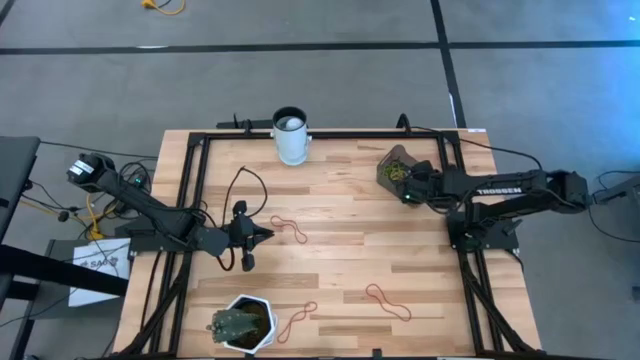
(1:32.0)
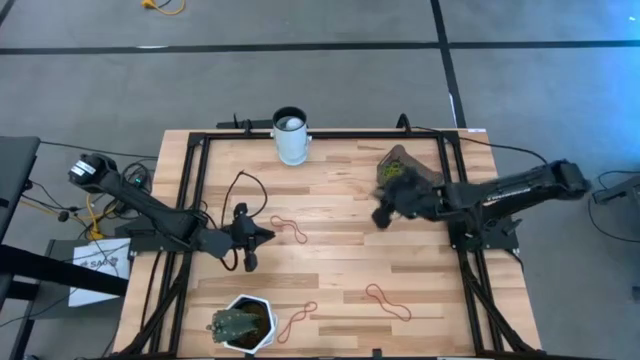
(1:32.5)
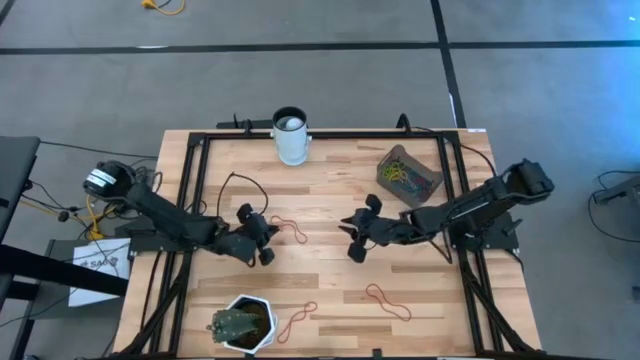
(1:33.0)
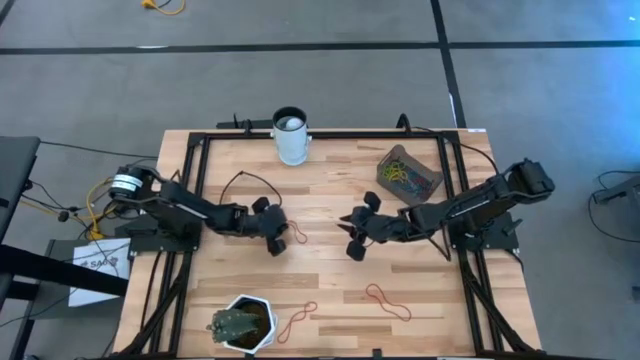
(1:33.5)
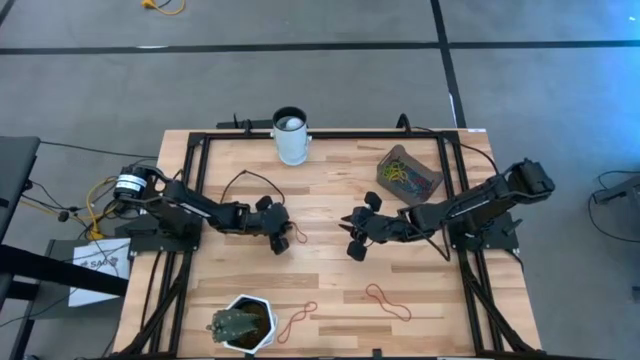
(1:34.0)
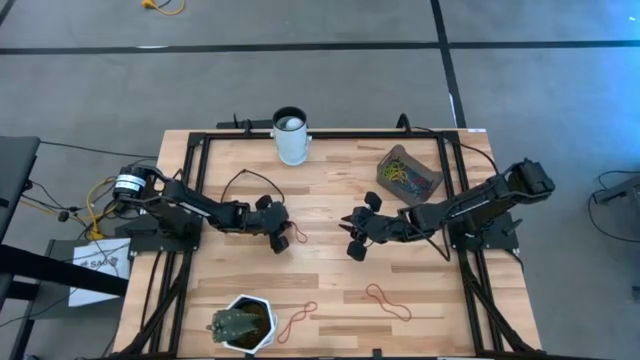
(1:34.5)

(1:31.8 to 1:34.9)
Task: Pick and place items into bin
Put the top red rubber band into the bin

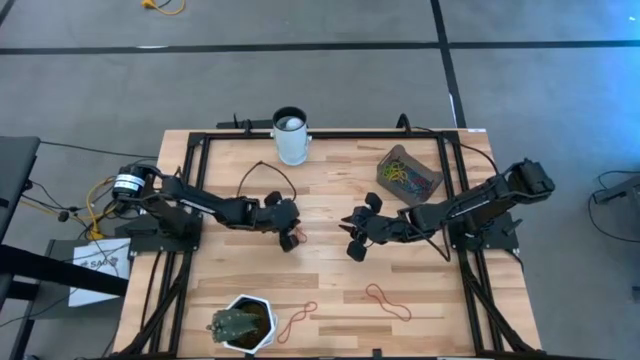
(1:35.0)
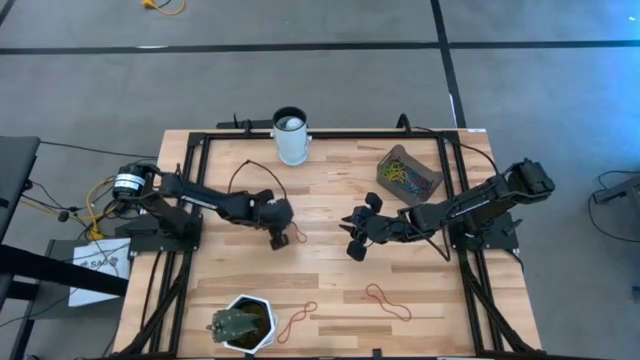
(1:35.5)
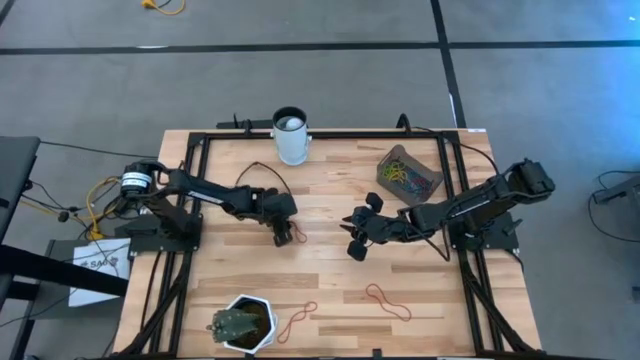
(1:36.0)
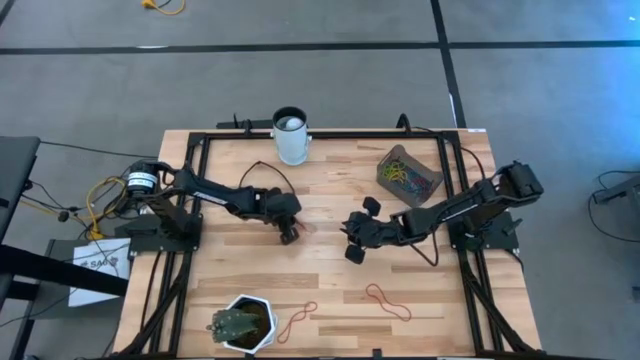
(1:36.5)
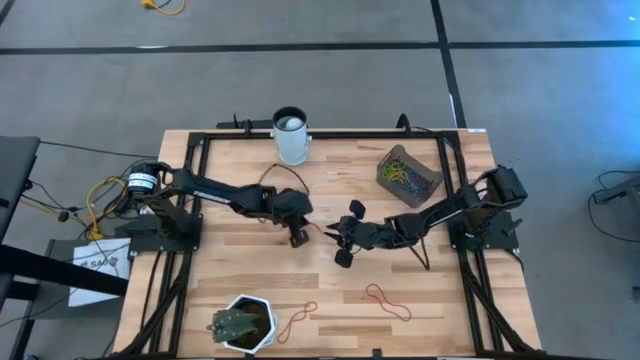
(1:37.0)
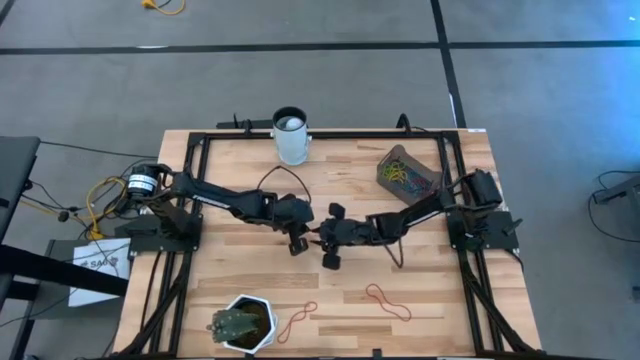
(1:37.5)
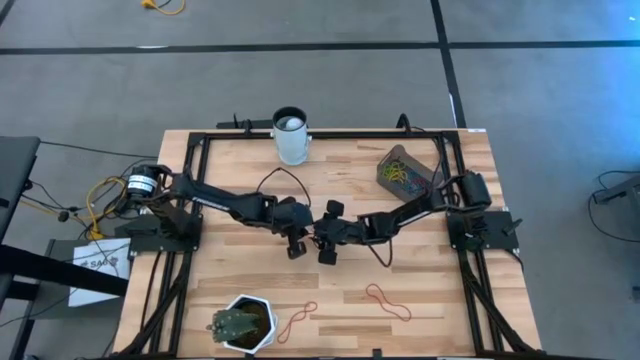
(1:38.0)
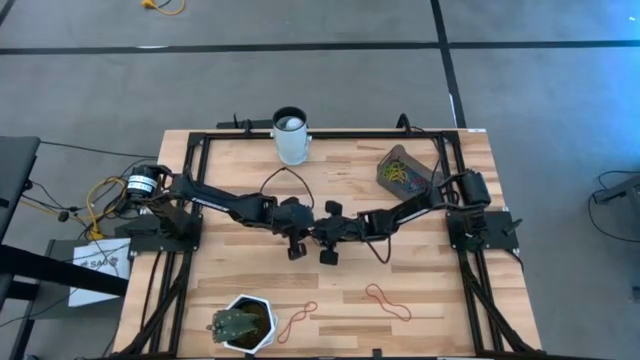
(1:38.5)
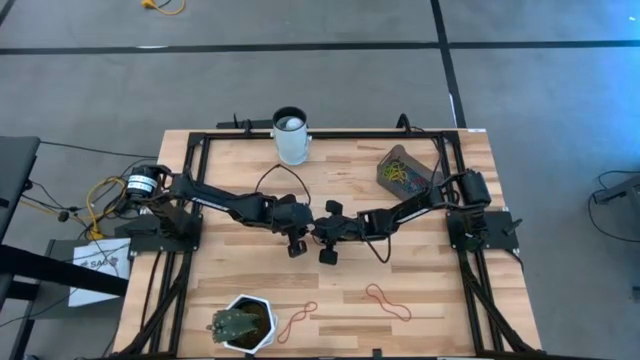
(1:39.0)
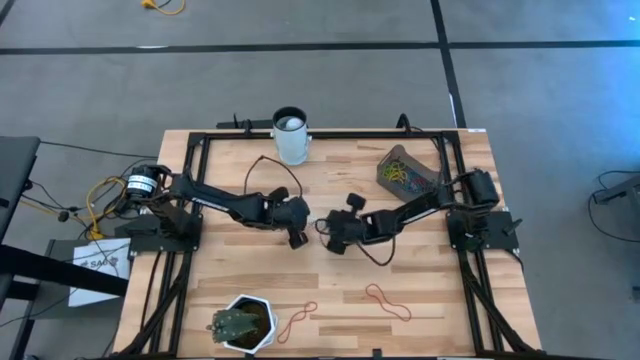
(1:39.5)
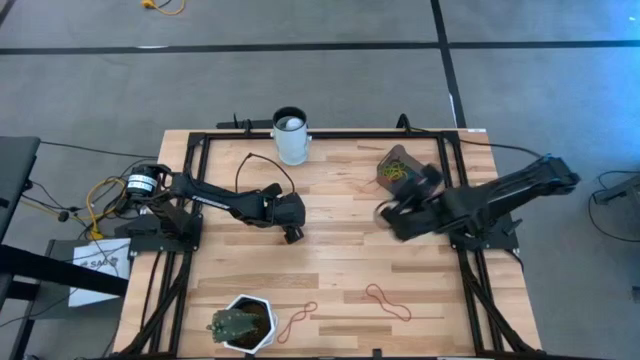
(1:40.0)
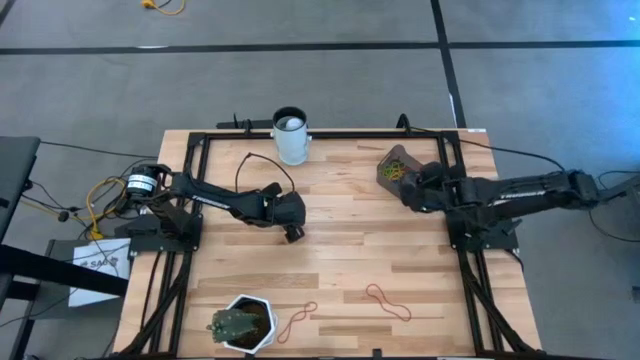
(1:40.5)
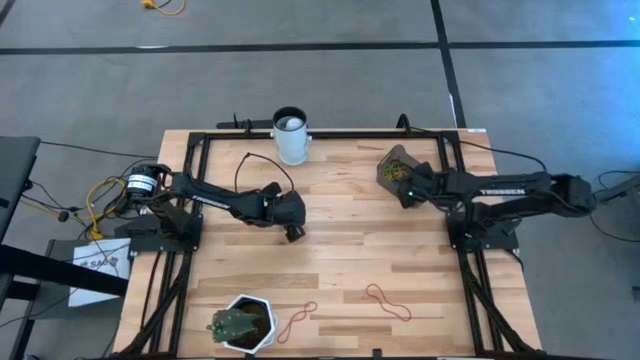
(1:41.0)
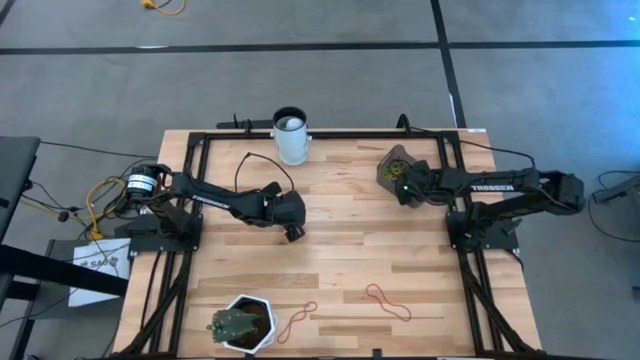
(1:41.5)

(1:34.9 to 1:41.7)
Put the top red rubber band into the bin

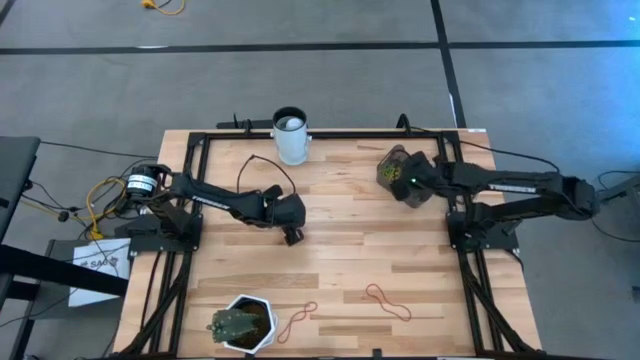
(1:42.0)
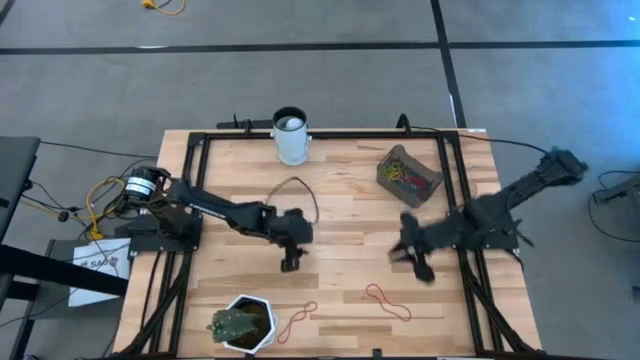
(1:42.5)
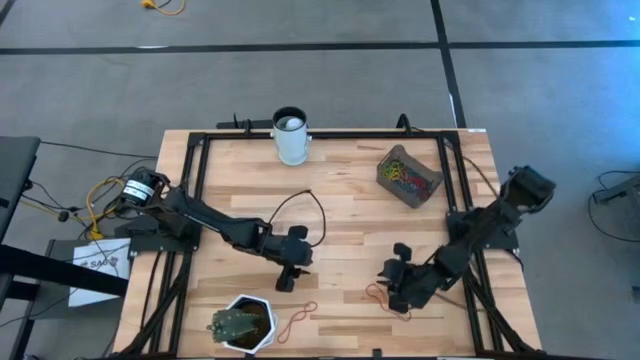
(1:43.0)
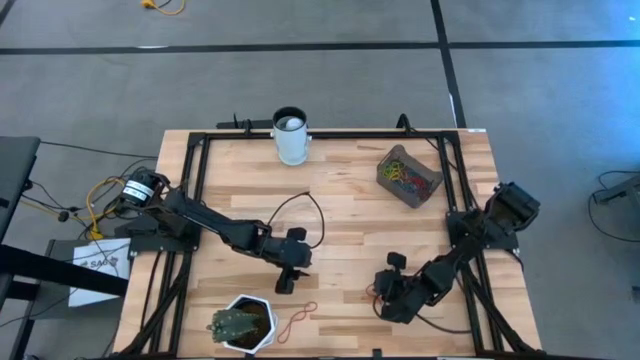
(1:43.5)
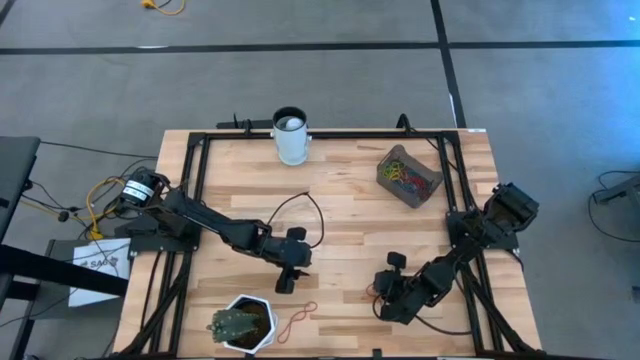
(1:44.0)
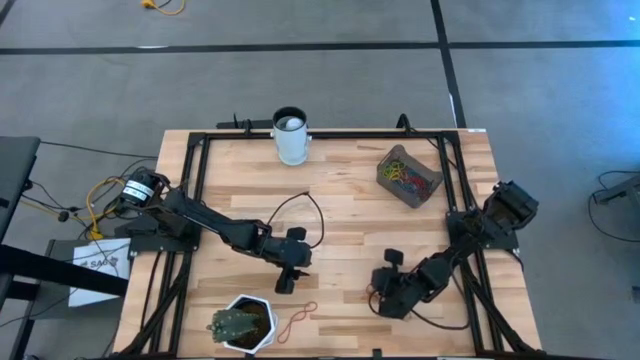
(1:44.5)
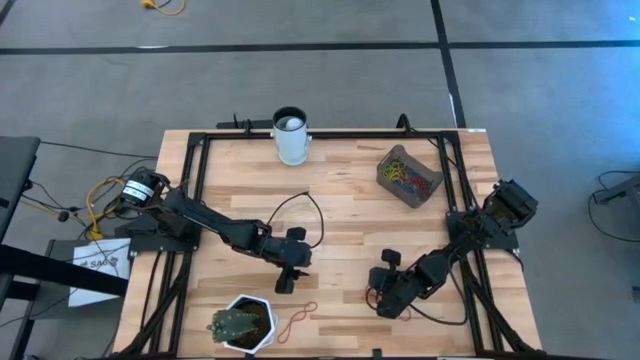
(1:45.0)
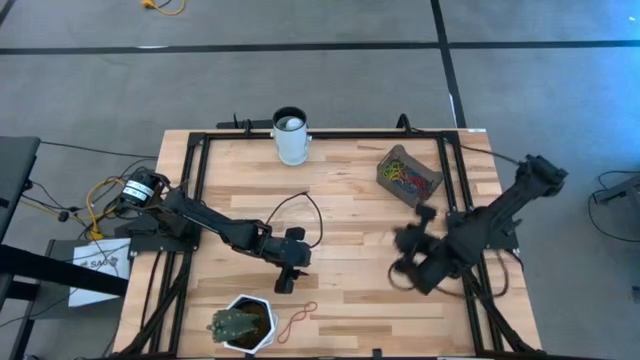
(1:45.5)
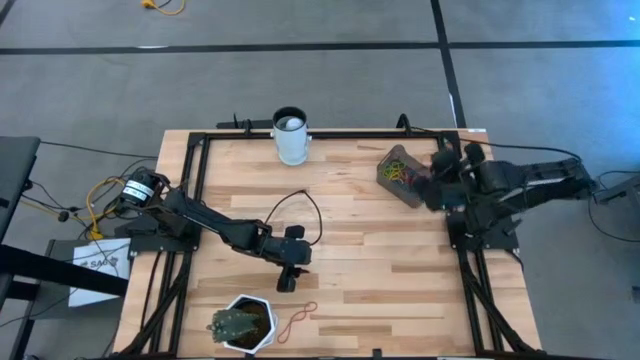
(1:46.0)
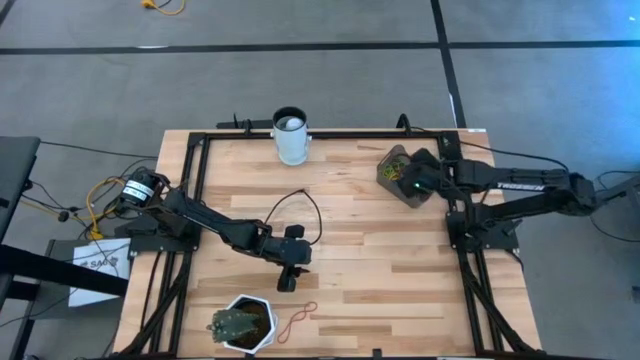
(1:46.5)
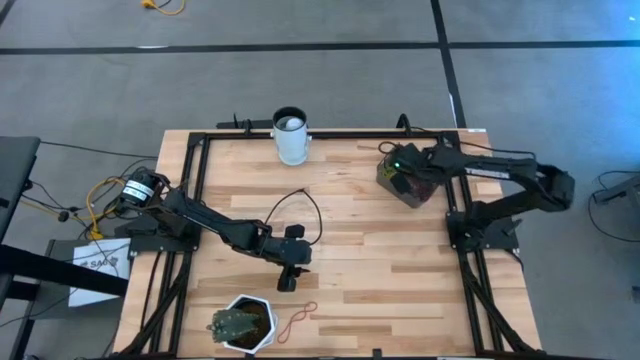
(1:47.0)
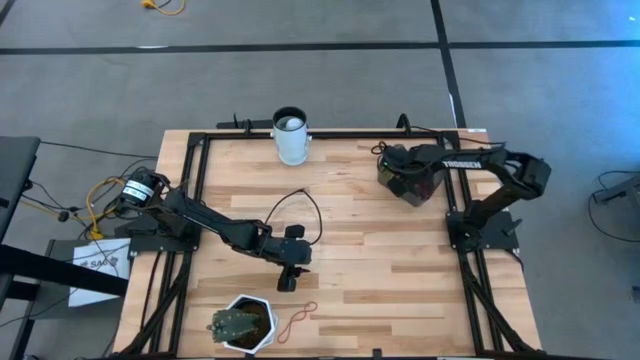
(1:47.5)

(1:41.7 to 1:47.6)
Put the right red rubber band into the bin

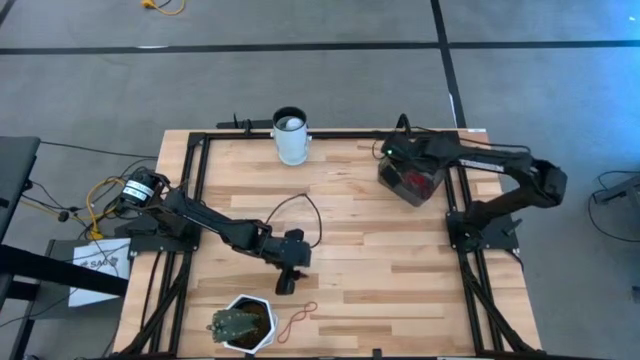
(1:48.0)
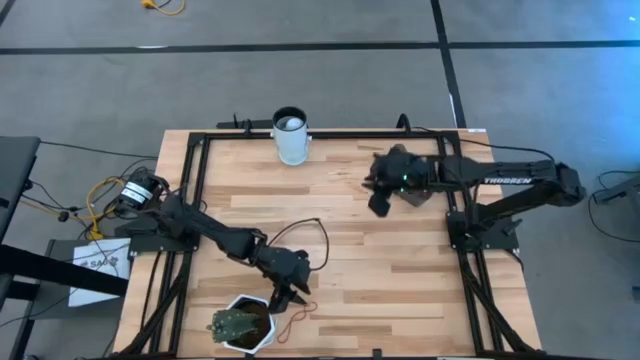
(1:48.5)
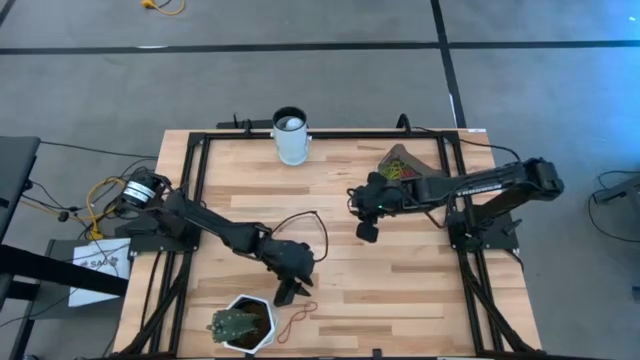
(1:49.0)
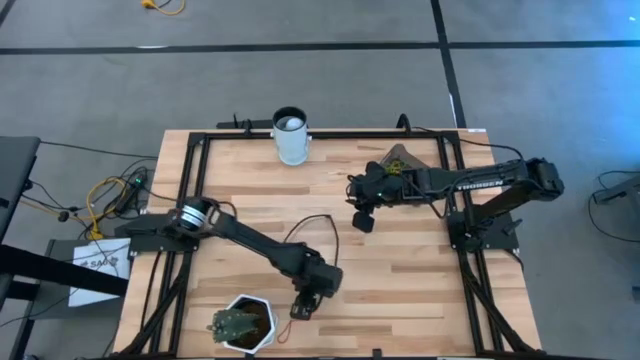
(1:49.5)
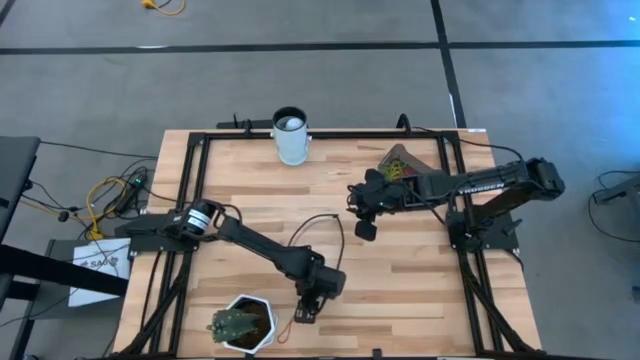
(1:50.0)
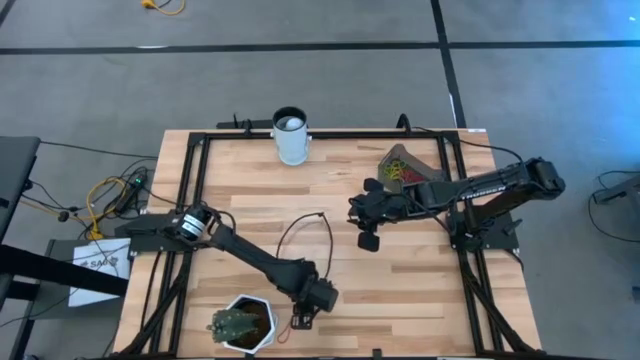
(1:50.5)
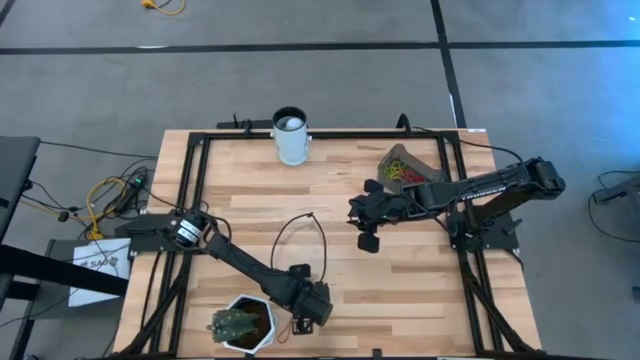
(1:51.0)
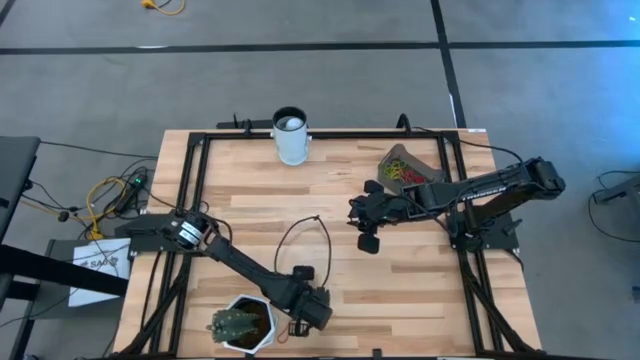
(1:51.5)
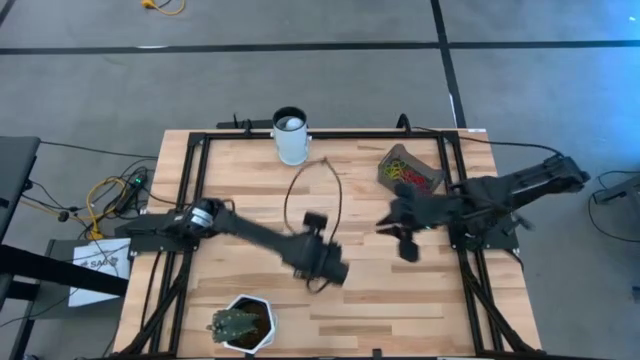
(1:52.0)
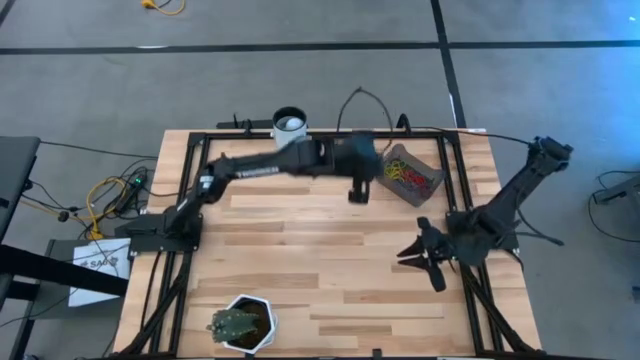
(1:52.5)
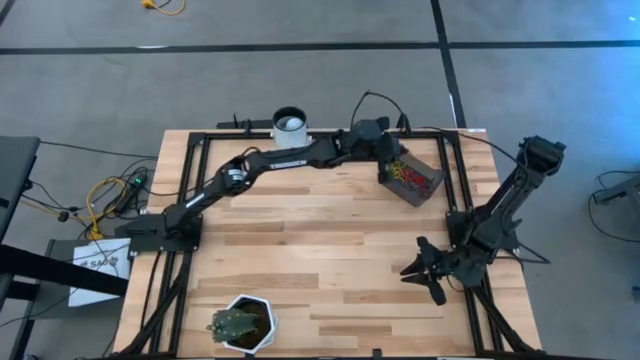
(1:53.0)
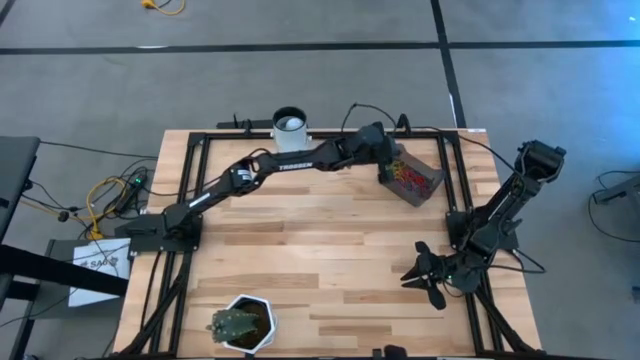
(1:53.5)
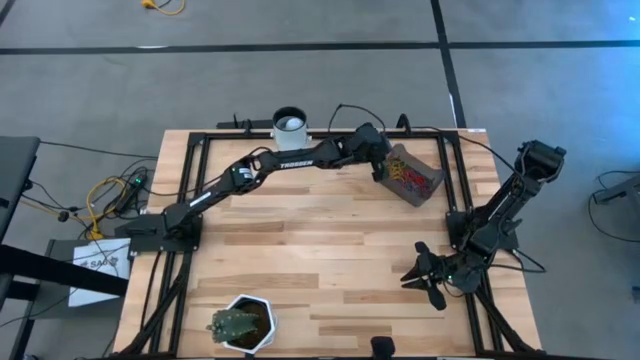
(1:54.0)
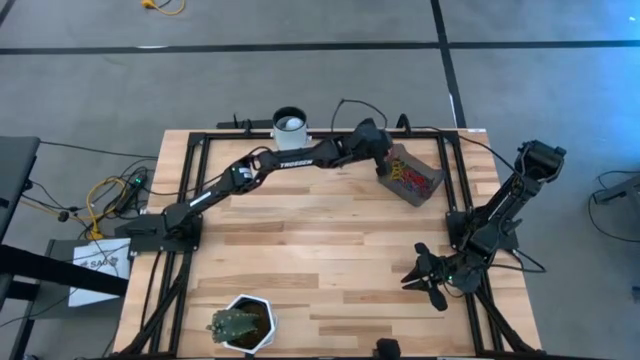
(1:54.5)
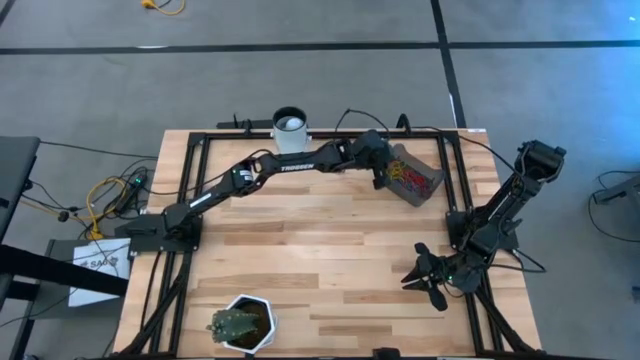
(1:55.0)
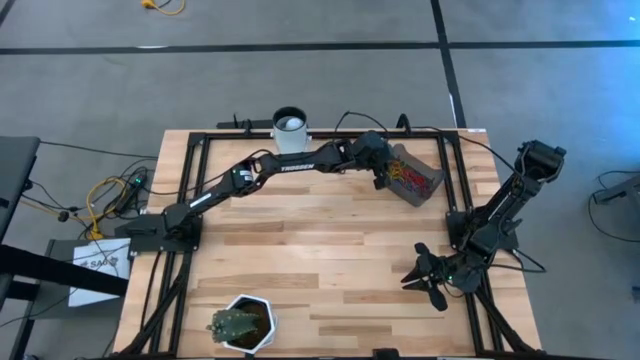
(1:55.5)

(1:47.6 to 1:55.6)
Put the red rubber band into the bin
